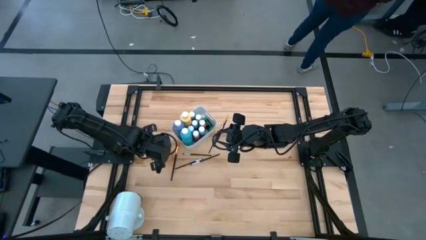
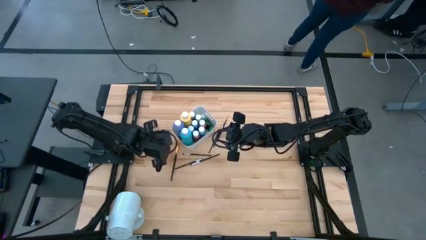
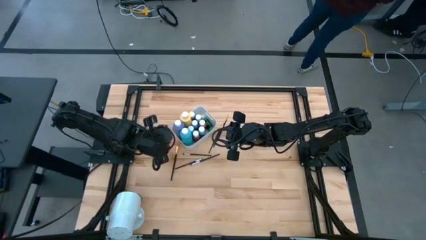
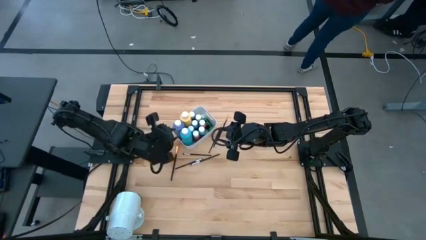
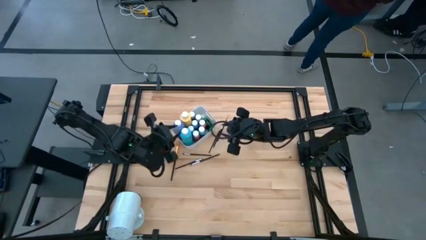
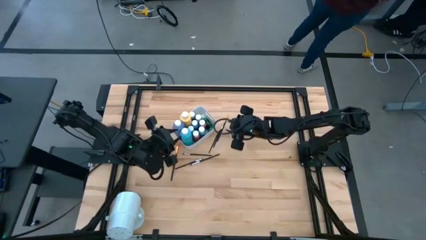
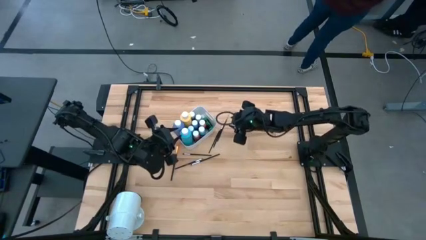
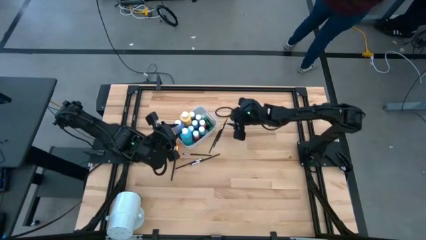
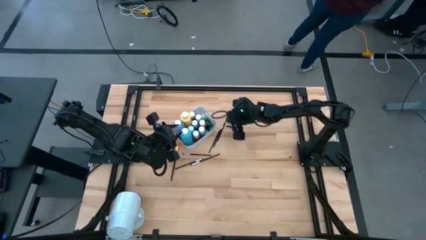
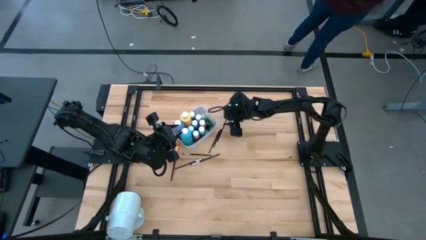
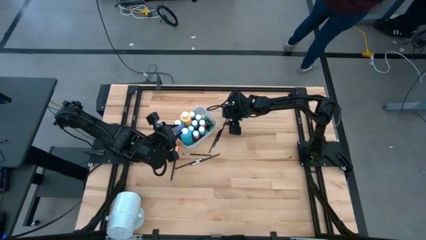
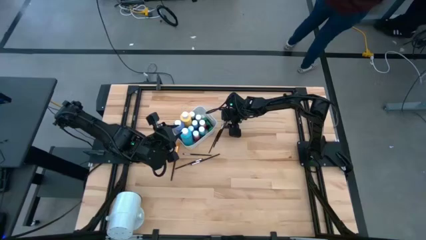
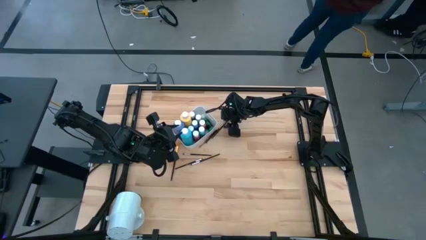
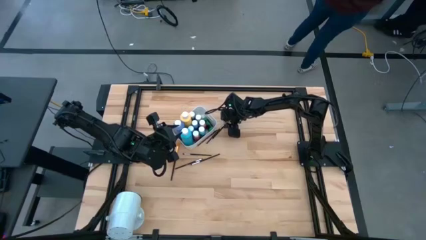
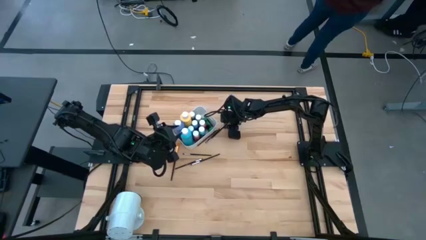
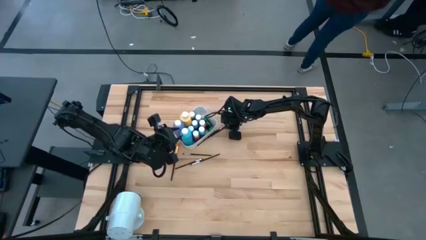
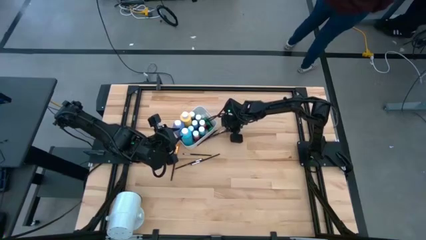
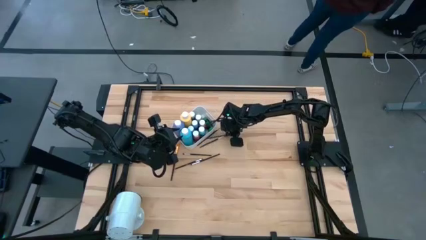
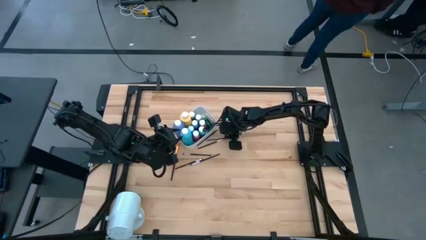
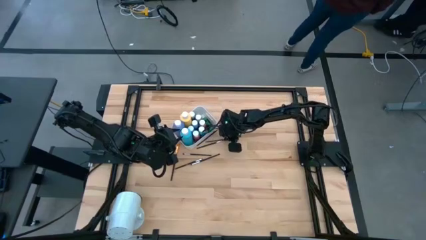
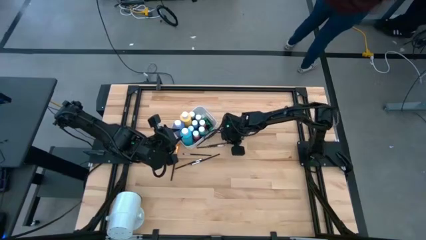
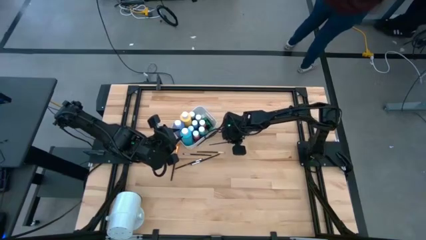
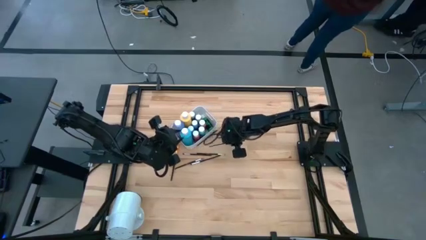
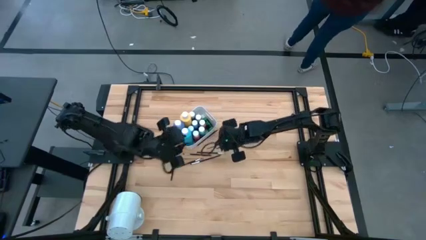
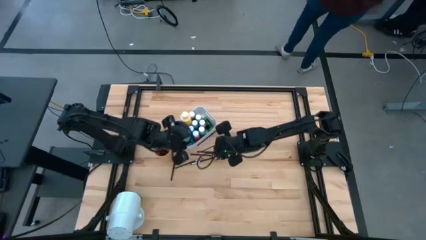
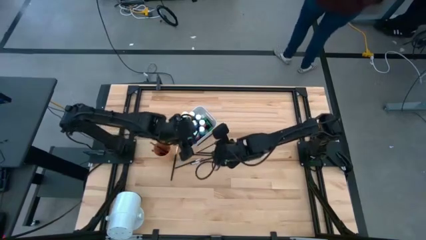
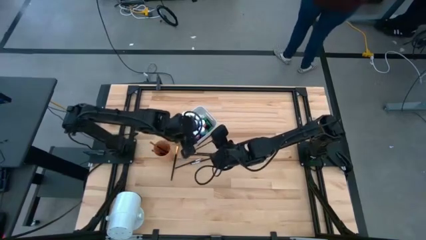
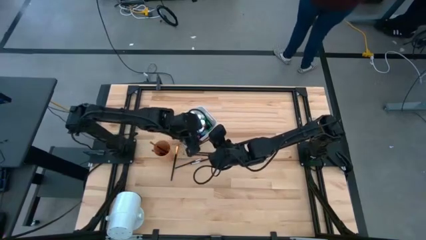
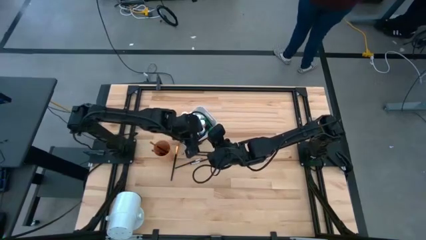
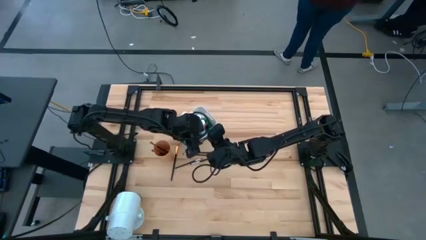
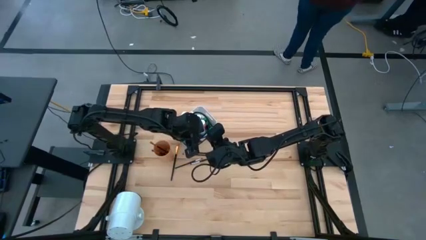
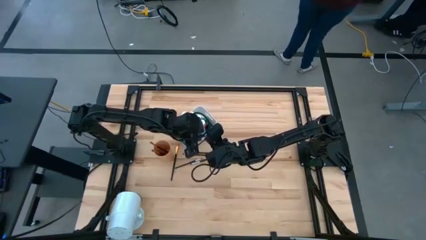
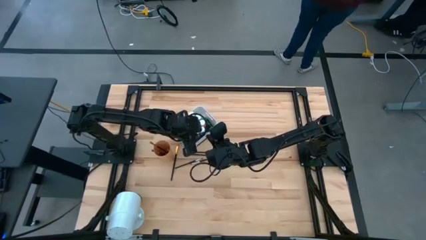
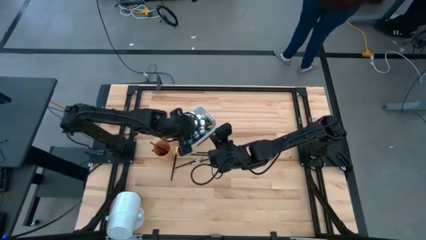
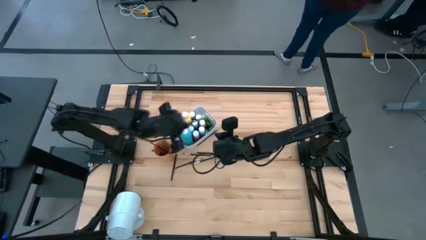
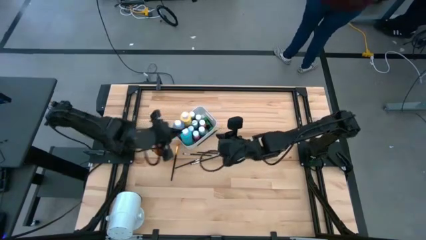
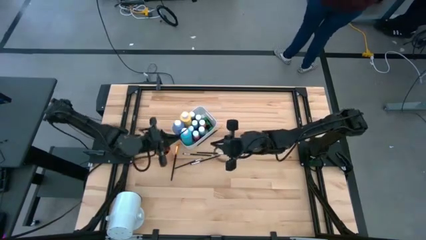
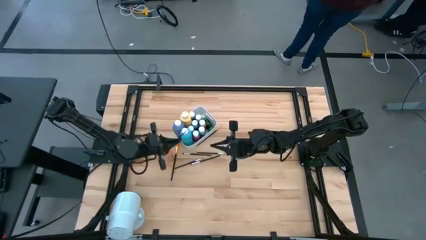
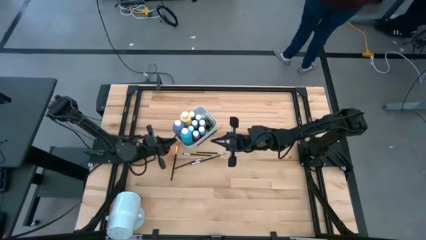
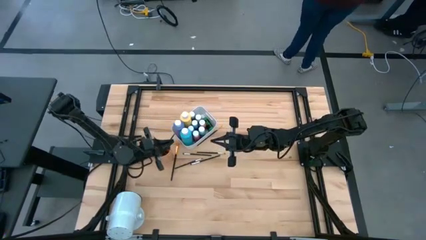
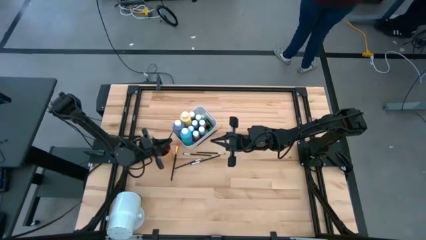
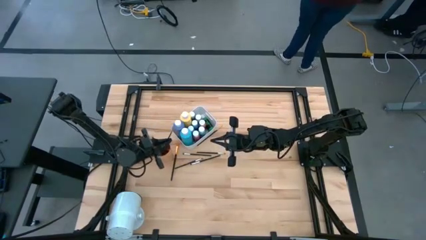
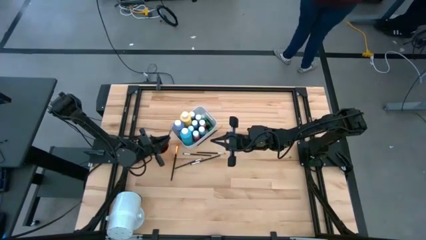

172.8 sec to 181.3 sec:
Task: Pick & Place Paint Supplies
Put the top right black gold paintbrush into the orange cup

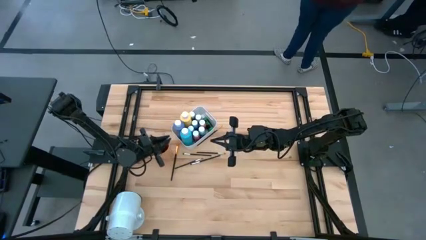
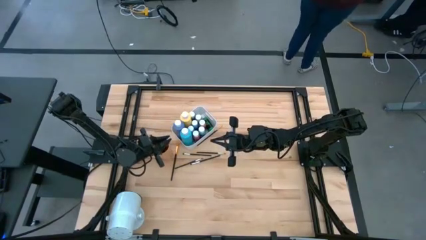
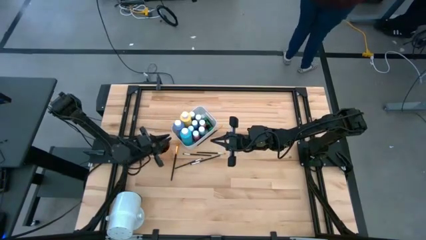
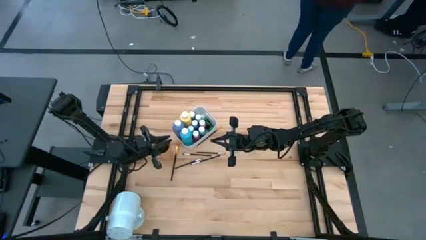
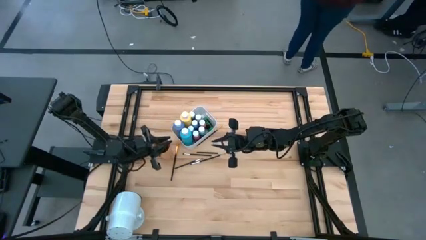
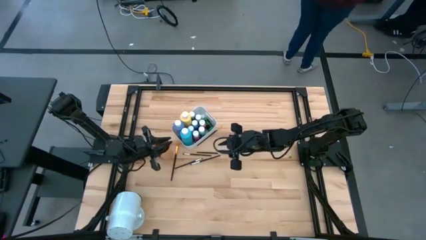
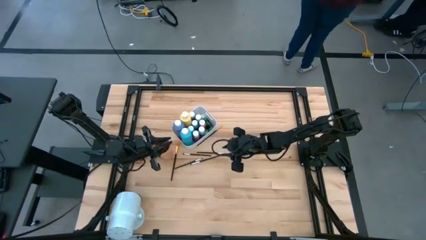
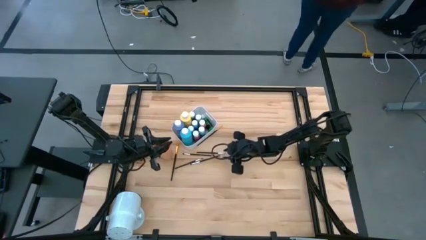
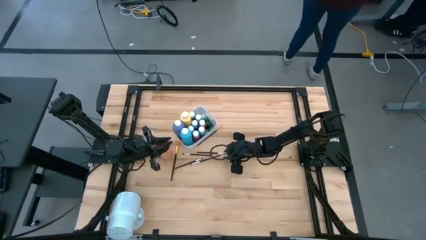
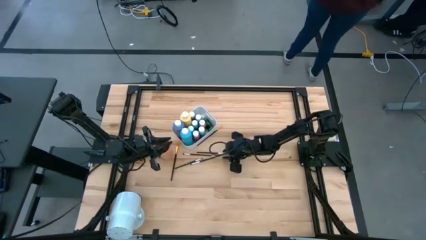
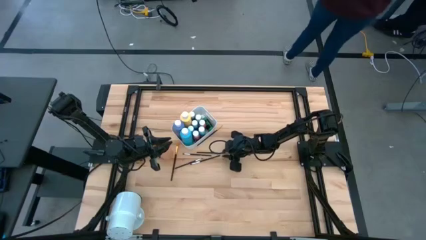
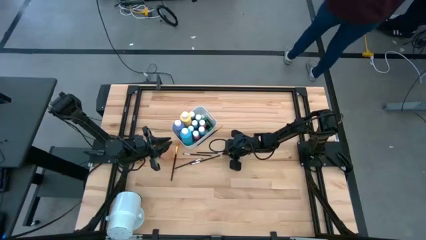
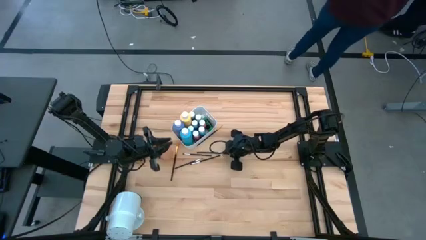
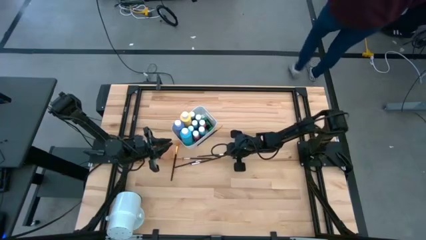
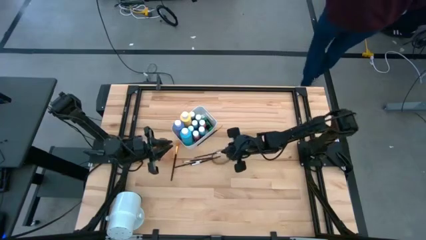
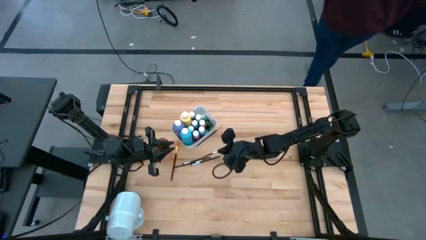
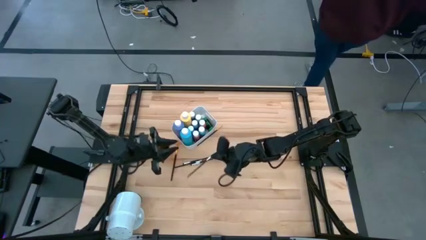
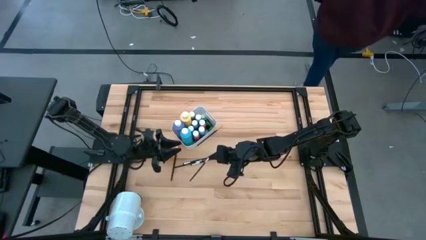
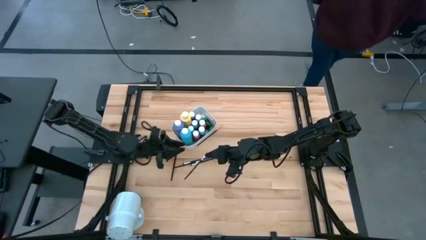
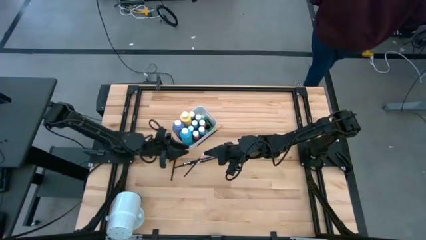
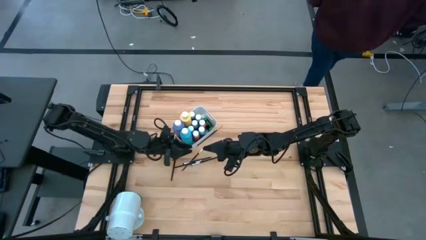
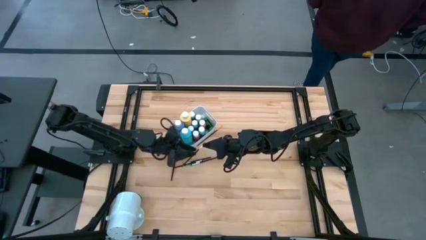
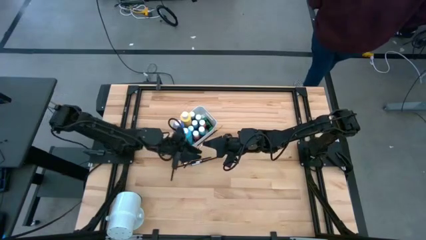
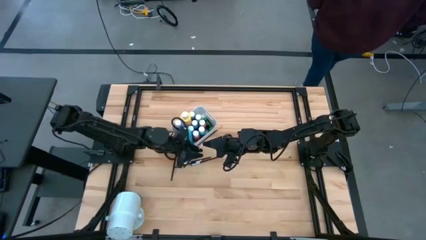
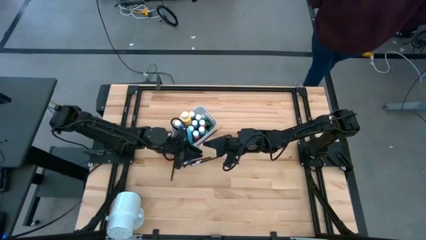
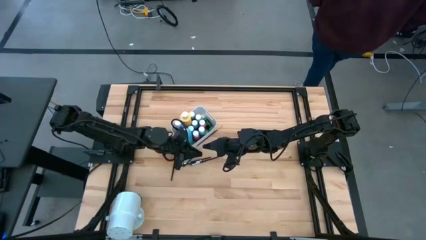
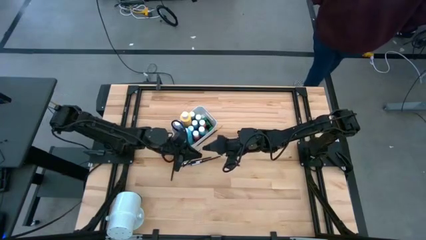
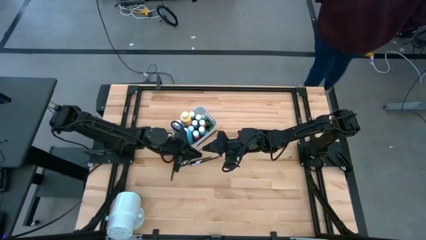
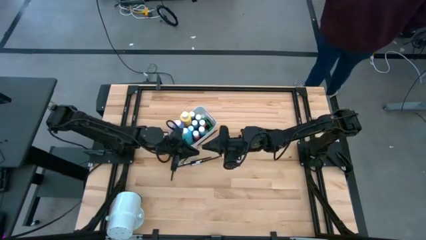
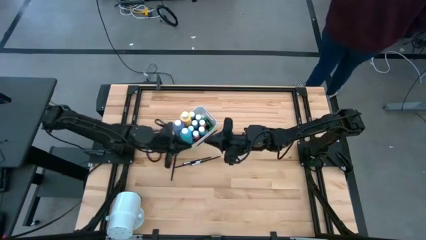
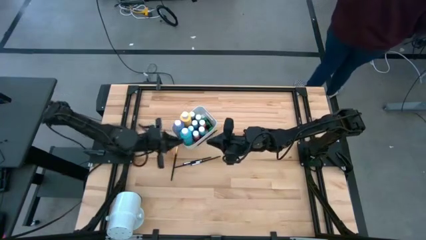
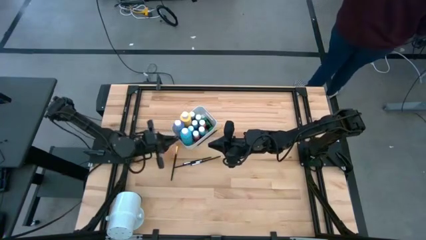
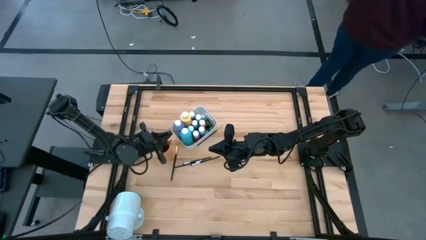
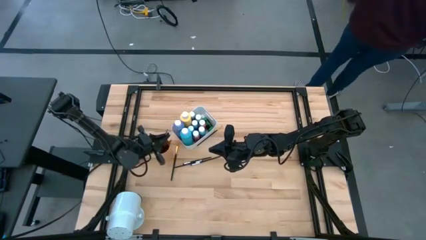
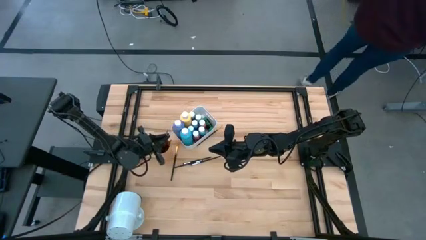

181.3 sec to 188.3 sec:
Put the black silver paintbrush into the orange cup
